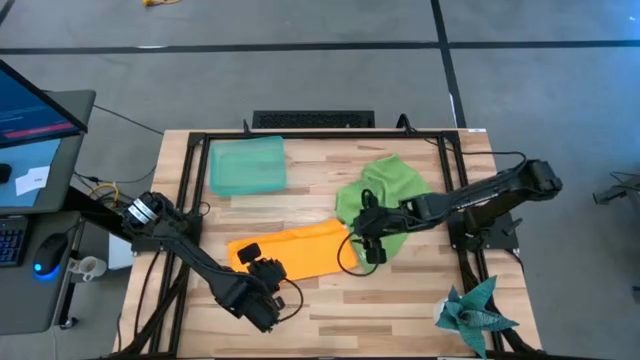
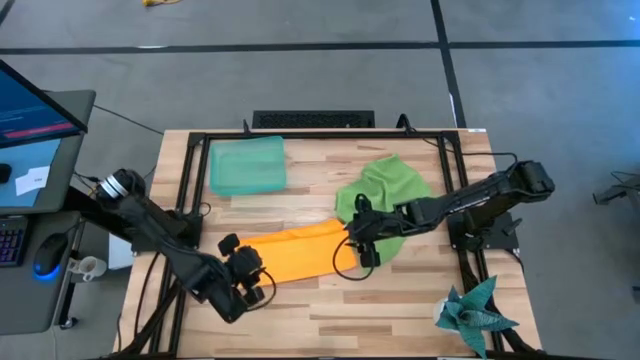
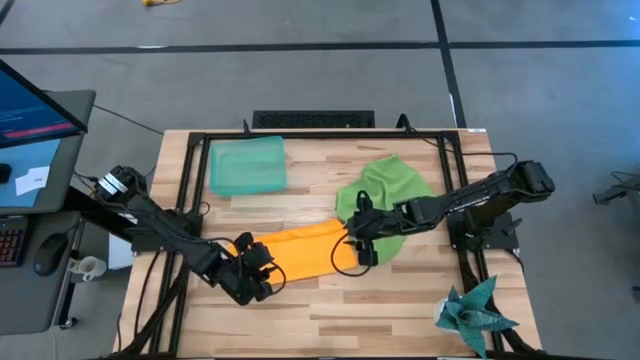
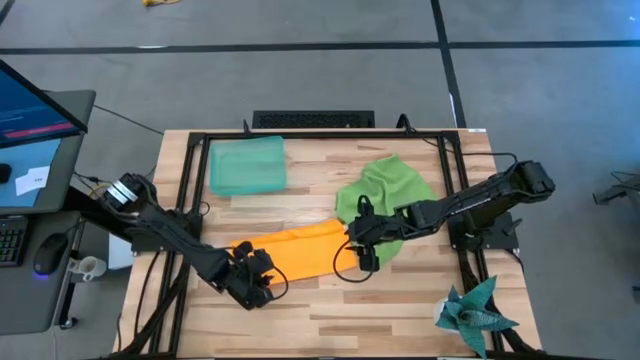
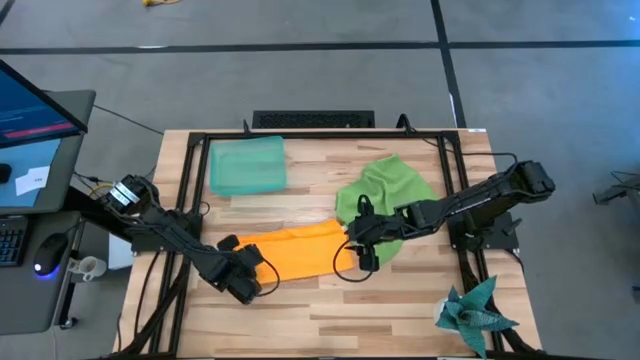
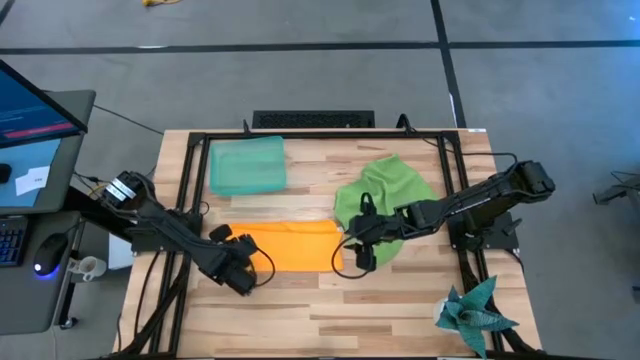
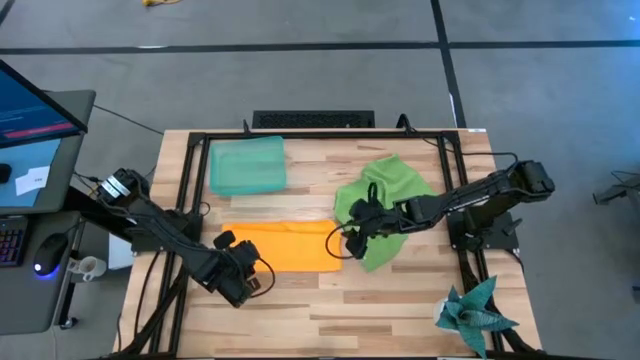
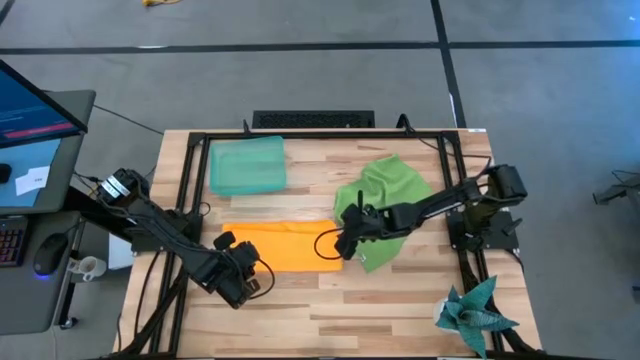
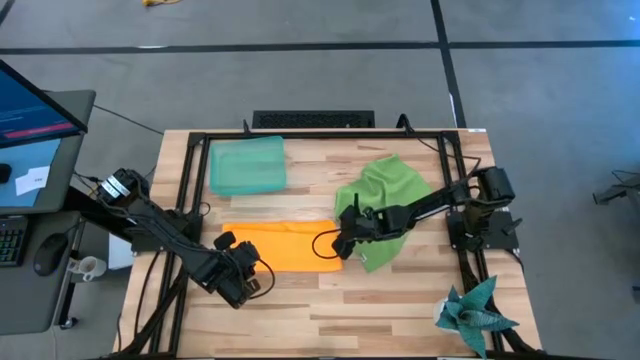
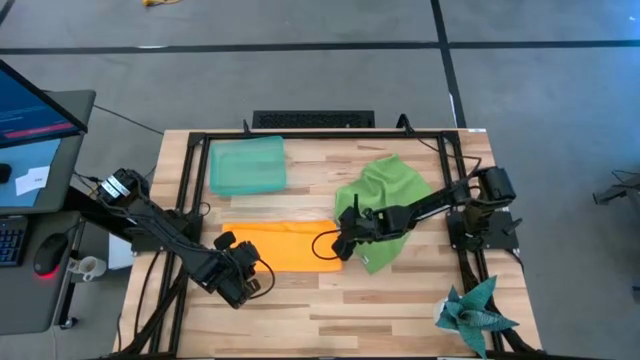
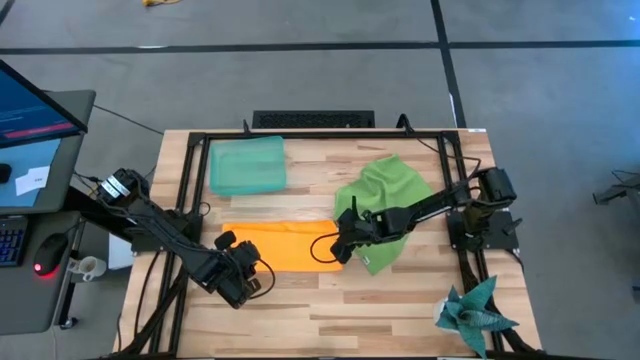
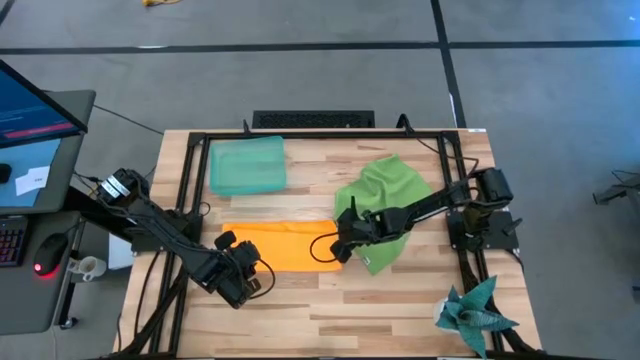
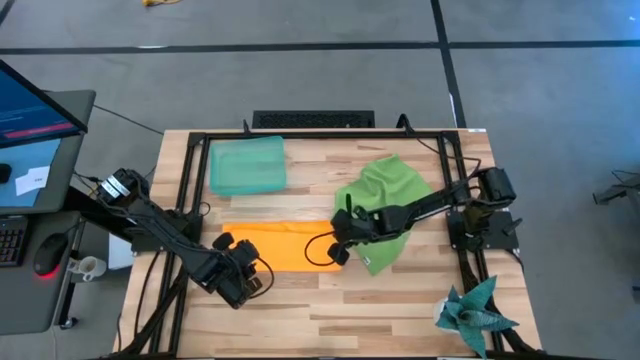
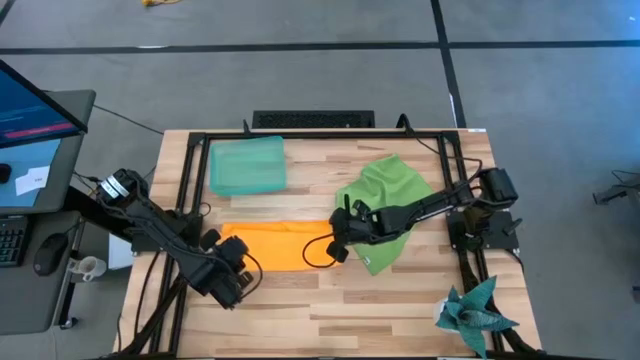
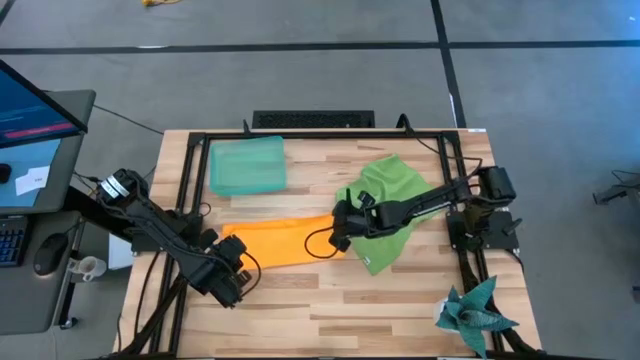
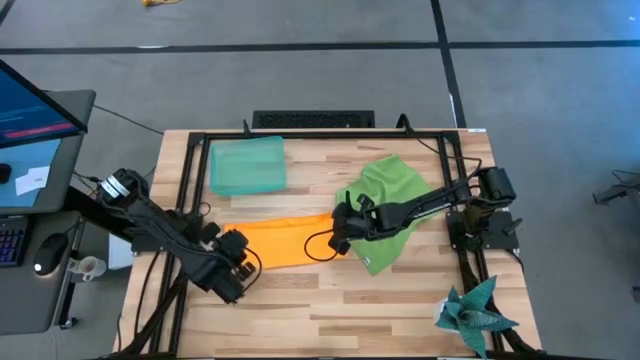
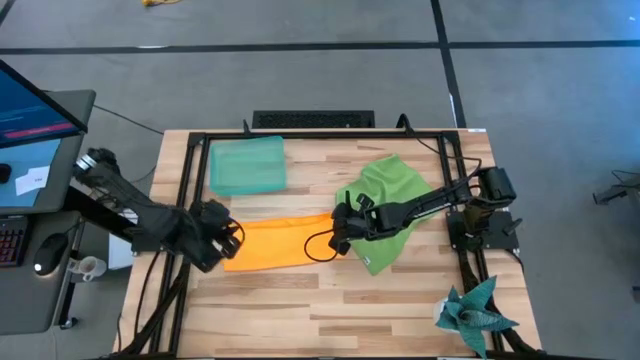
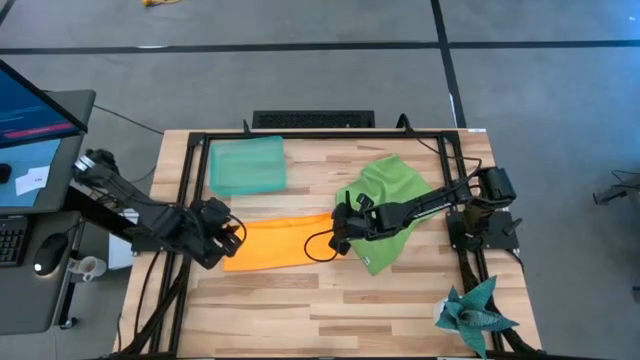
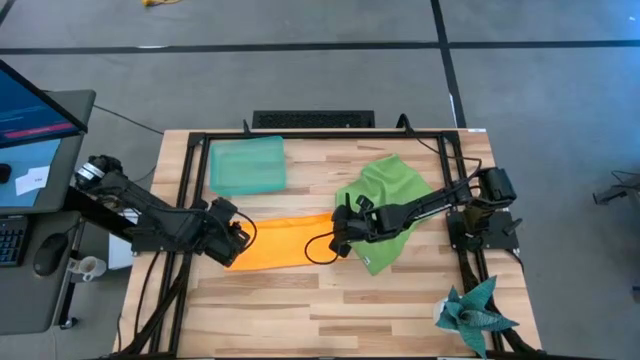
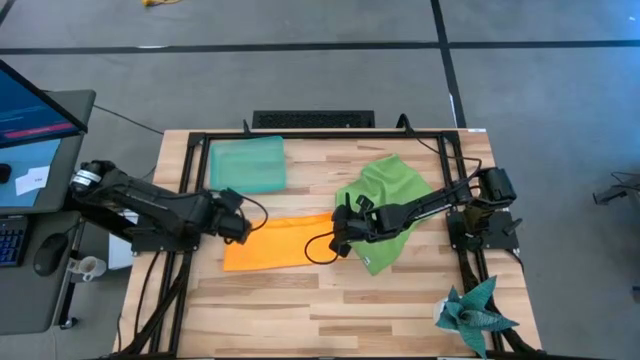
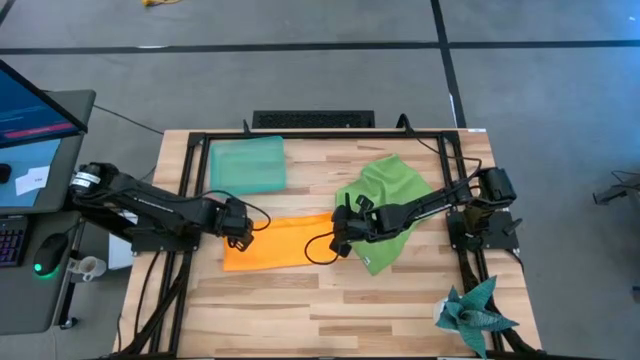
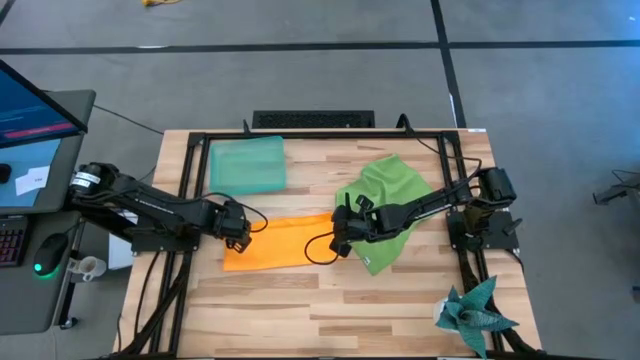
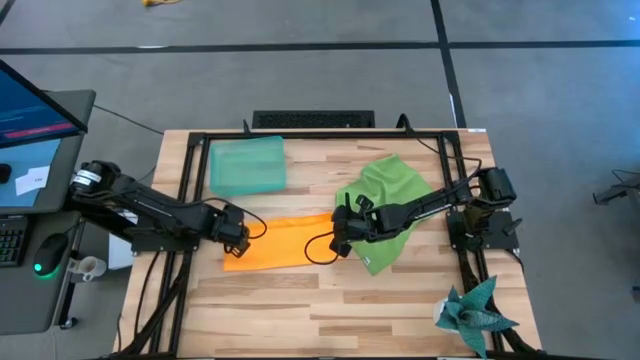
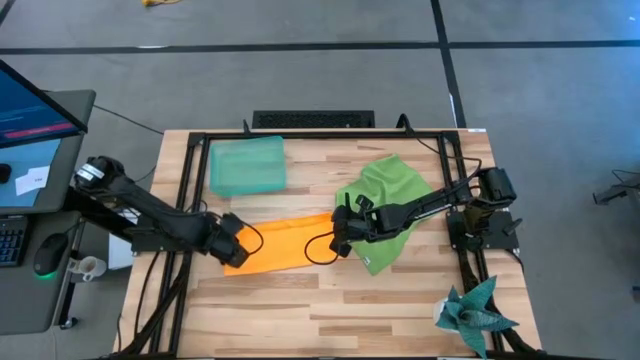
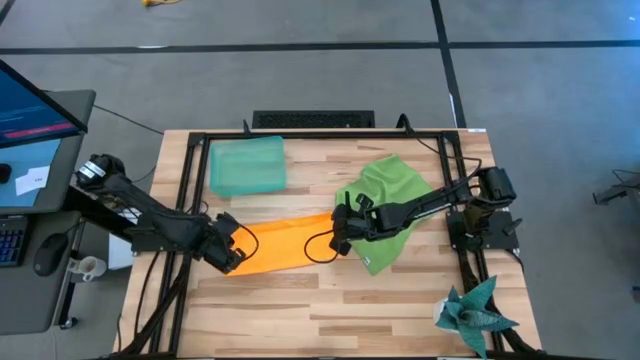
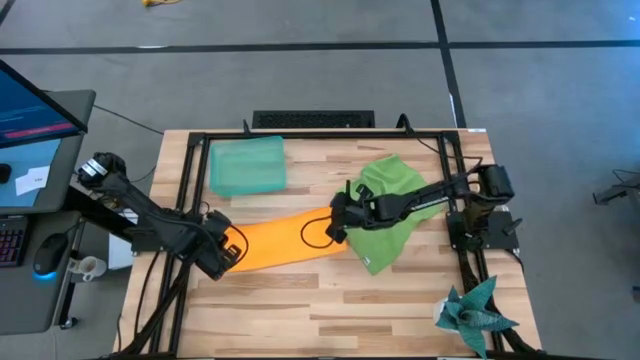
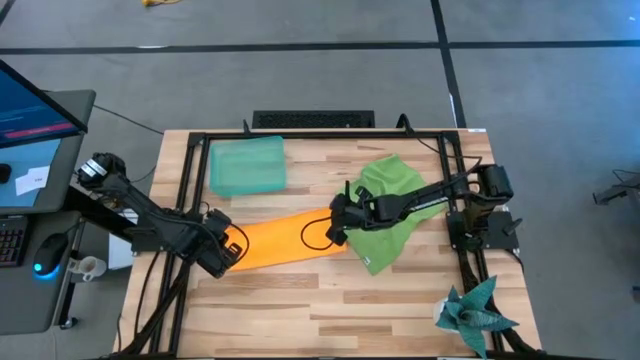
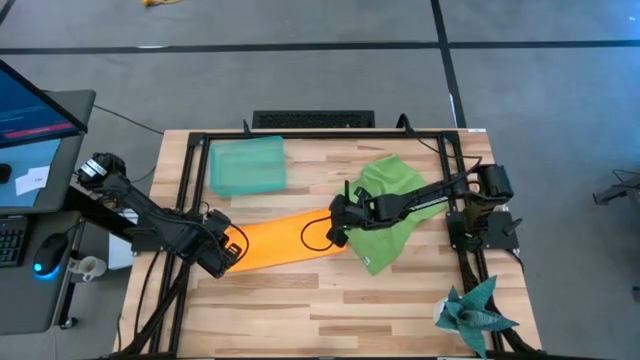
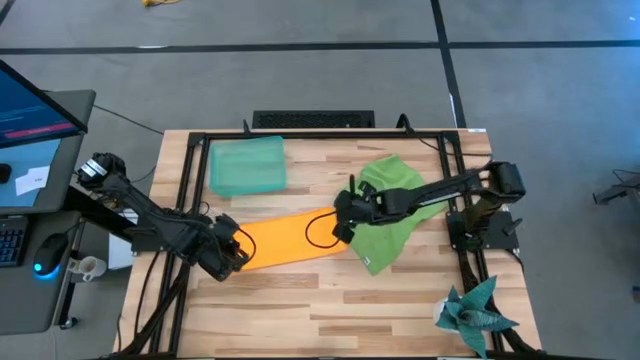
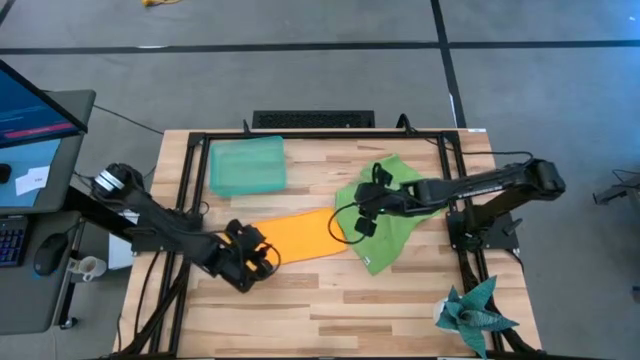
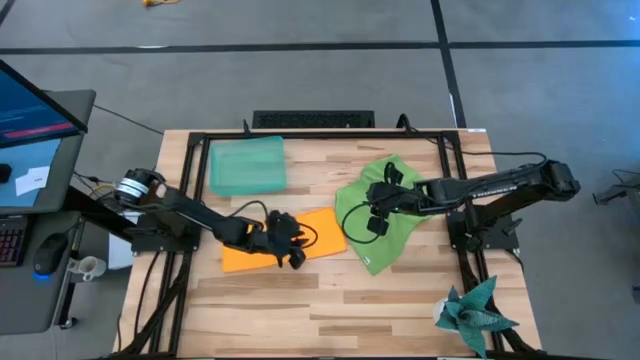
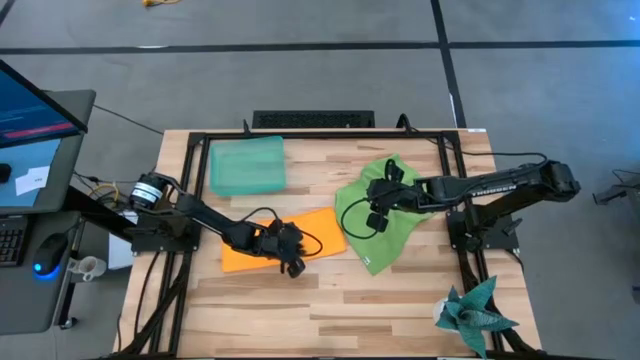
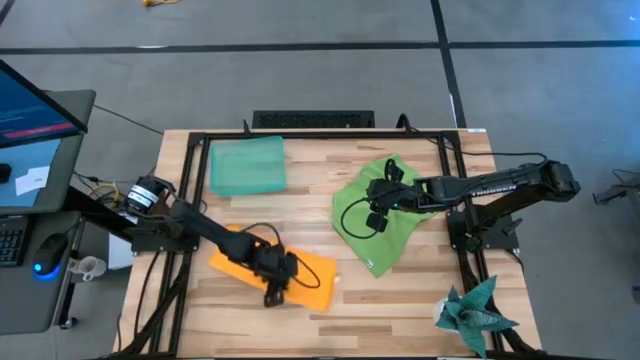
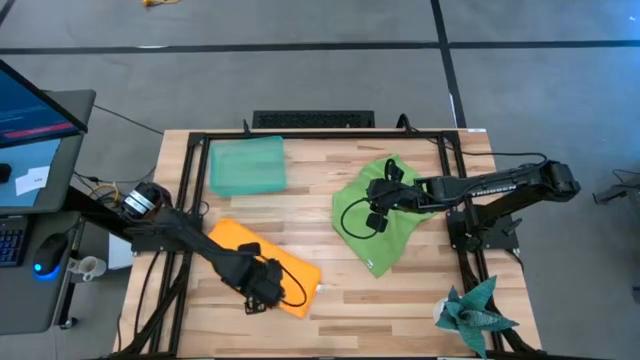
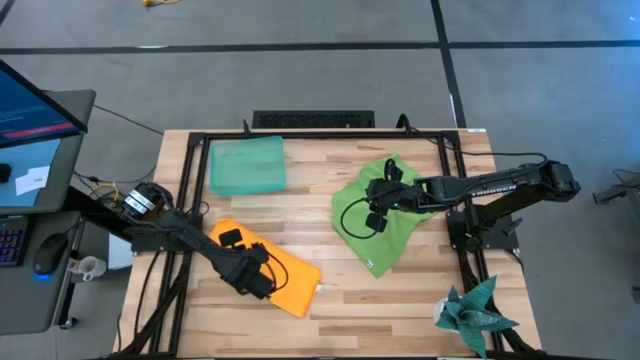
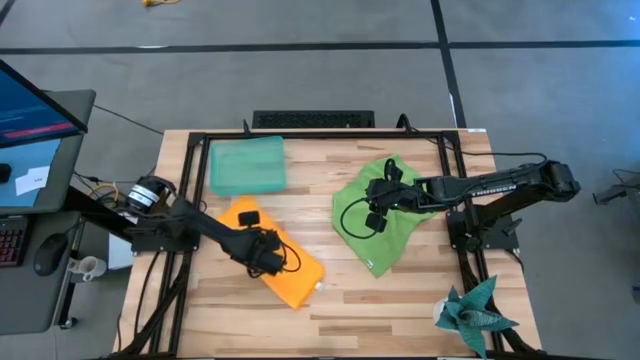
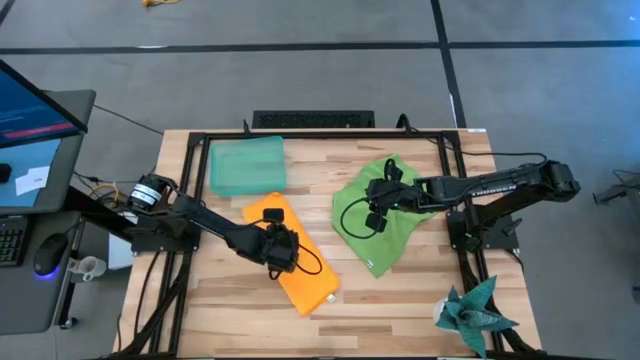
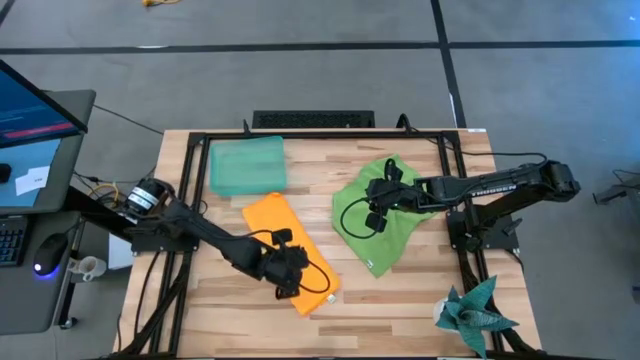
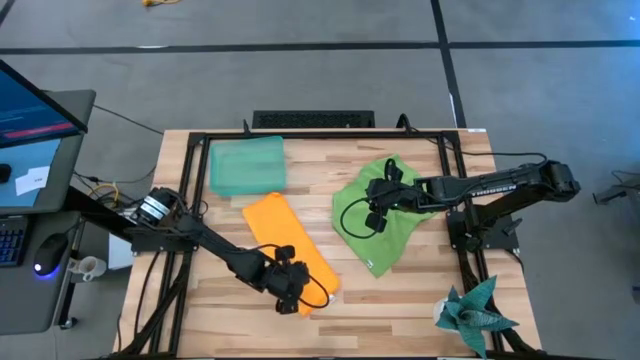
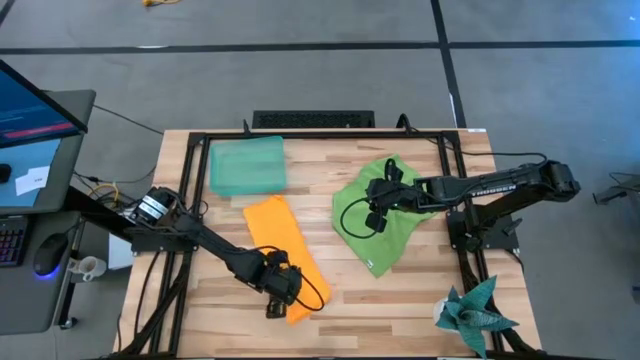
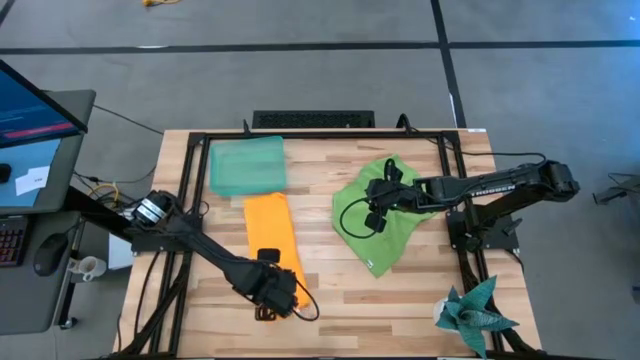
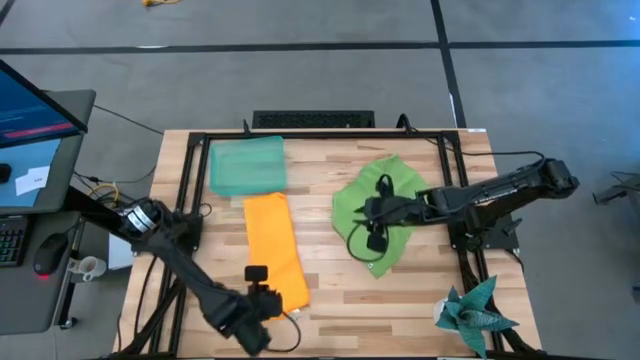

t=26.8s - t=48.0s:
Task: Roll microfiber towels into tight, uniform cylinder then place into a basket
Roll the yellow microfiber cloth
